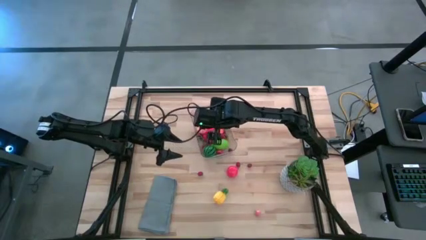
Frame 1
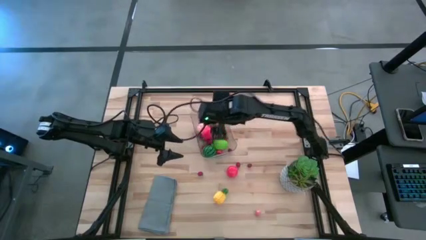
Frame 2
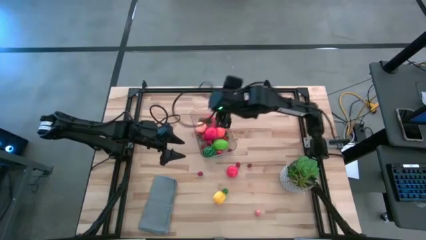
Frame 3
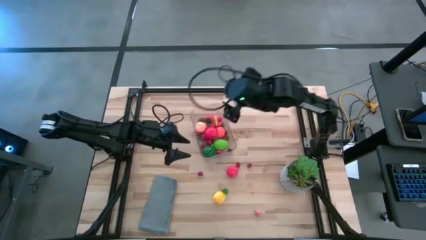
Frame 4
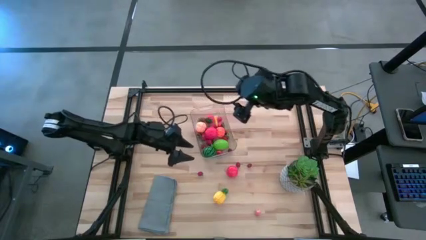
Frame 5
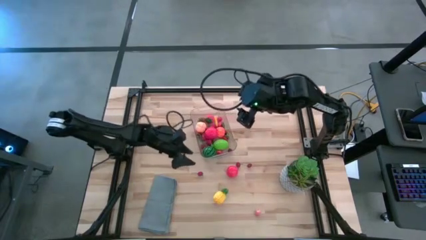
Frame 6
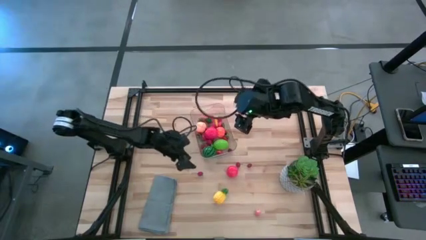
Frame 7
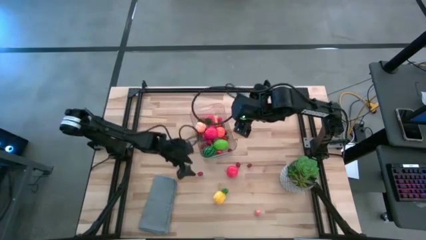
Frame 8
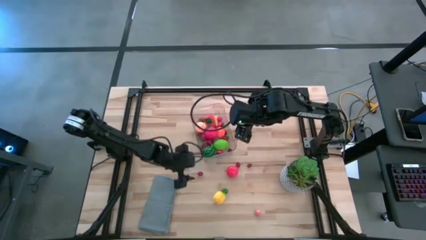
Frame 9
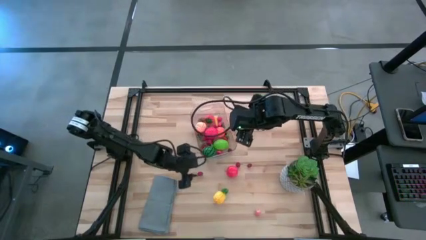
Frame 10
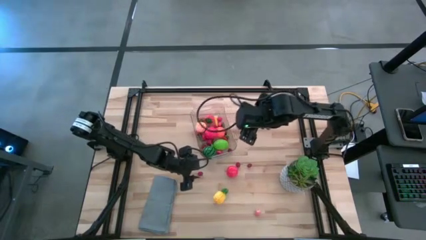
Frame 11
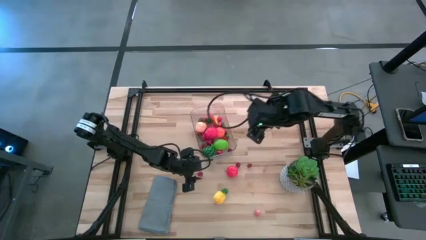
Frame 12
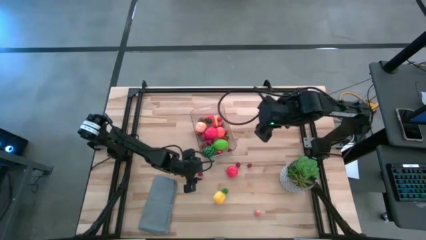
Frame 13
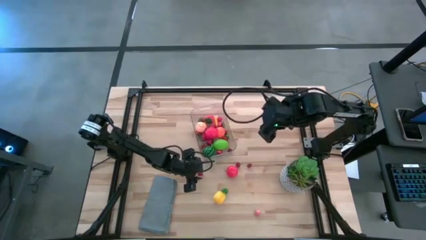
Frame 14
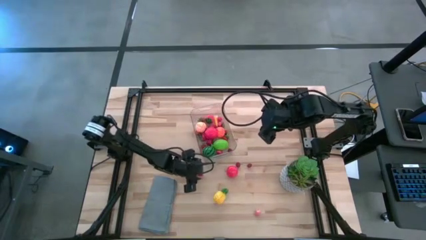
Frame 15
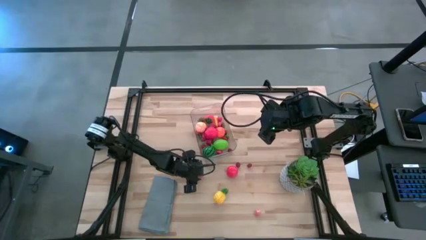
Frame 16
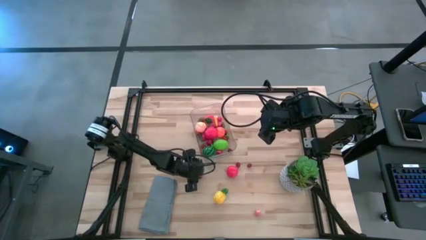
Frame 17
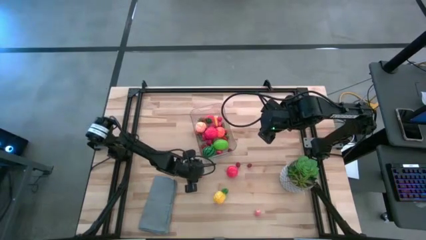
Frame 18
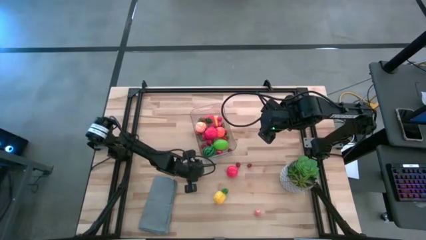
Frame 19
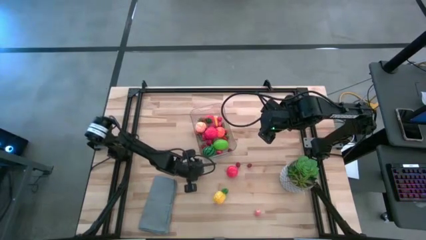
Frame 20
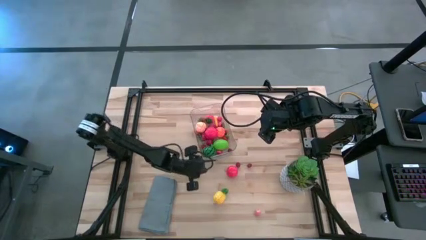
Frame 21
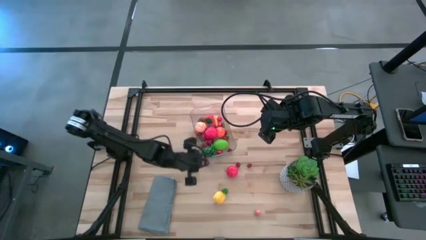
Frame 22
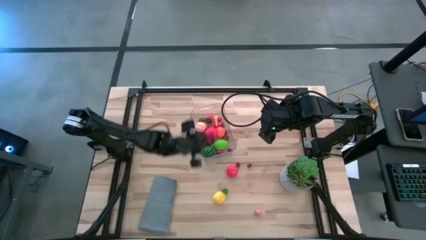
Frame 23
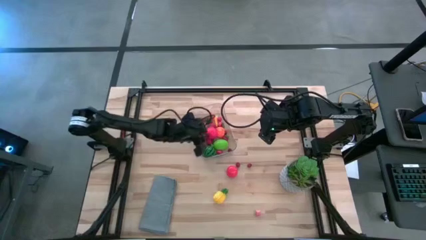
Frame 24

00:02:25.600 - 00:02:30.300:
Task: Pick and placing Produce into tupperware
Put the red cherry into the transparent container

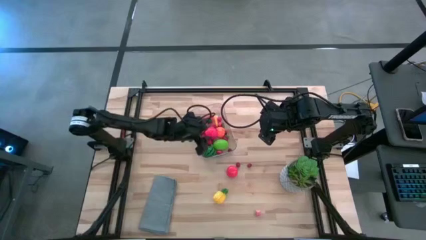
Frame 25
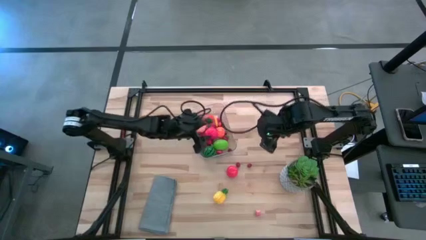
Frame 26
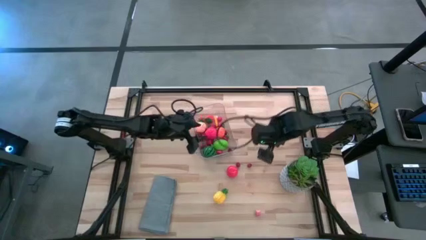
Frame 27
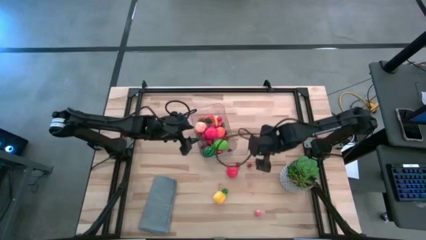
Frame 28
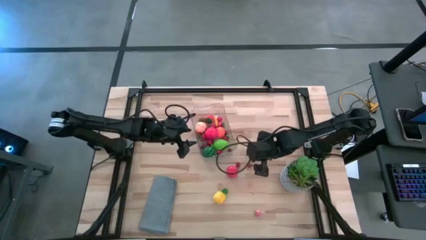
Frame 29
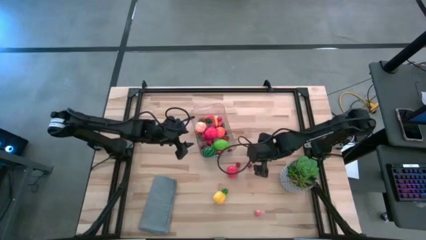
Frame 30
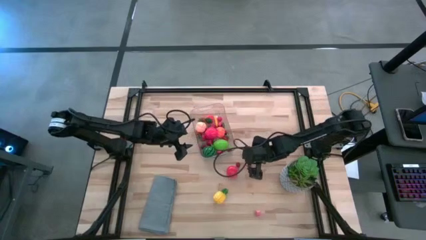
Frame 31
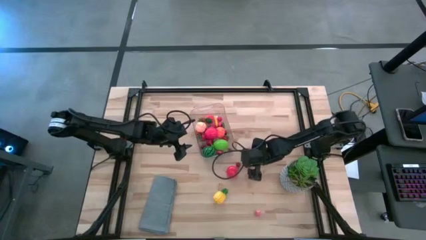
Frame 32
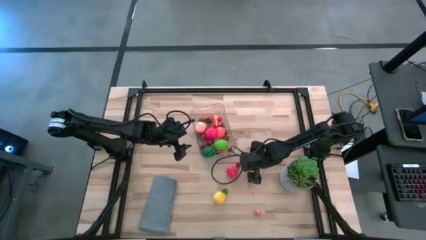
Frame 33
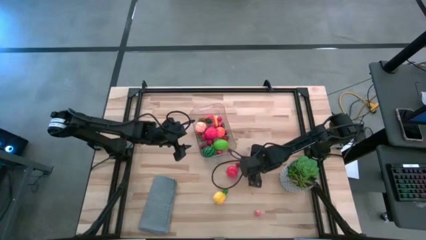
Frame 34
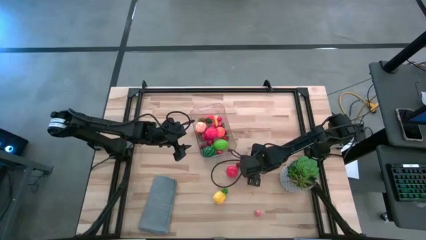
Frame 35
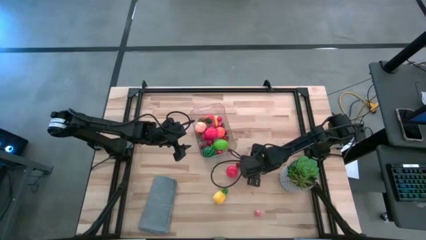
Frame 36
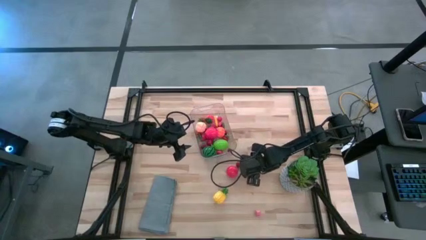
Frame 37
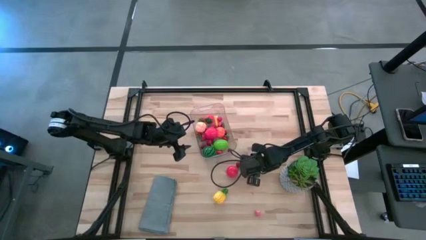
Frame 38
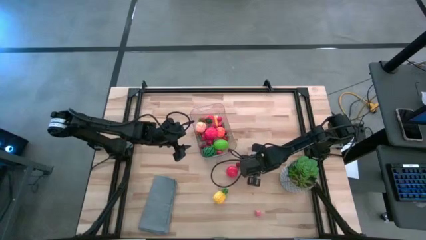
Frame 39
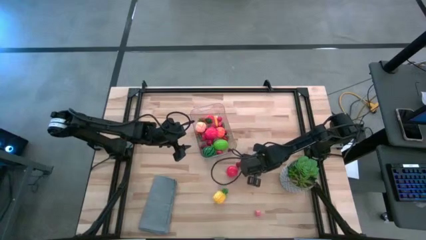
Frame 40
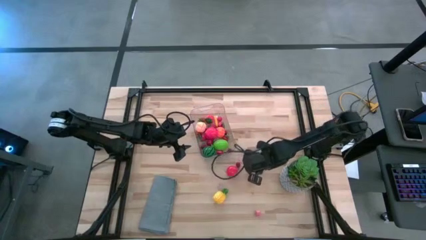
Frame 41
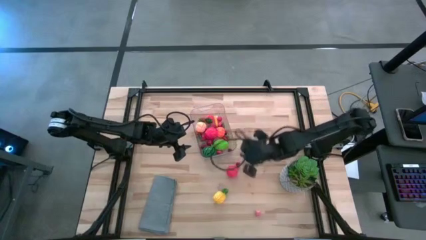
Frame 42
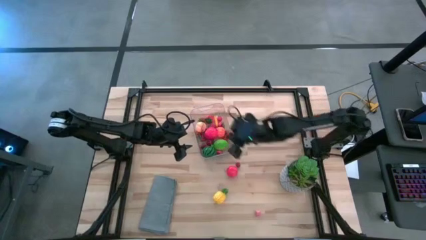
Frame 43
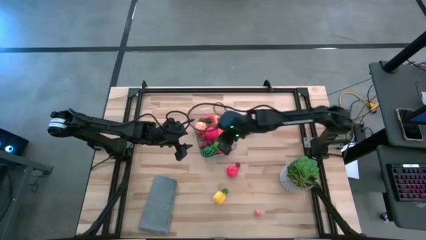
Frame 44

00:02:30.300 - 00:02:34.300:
Put the red cherry into the transparent container

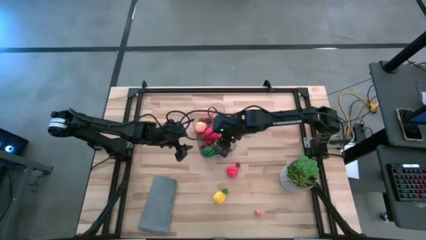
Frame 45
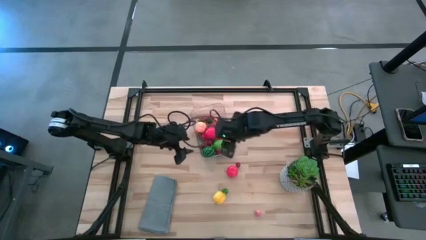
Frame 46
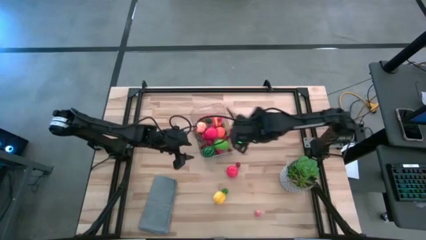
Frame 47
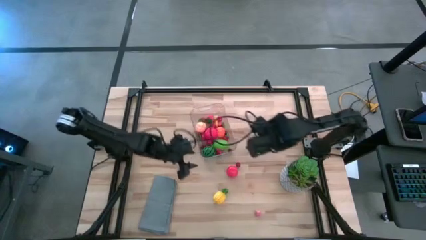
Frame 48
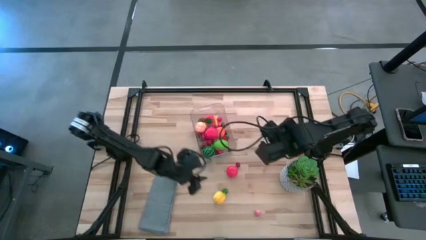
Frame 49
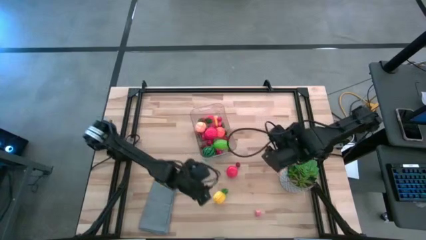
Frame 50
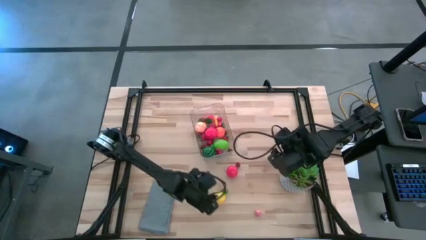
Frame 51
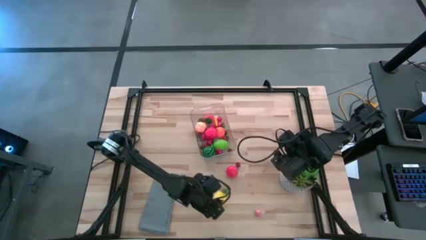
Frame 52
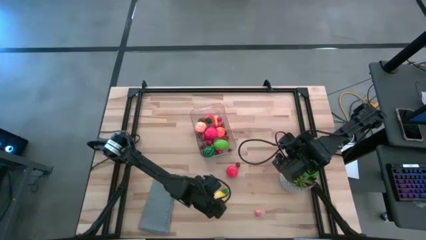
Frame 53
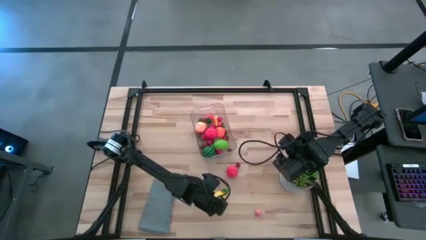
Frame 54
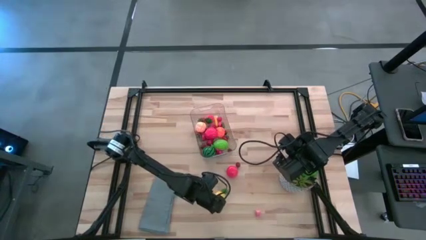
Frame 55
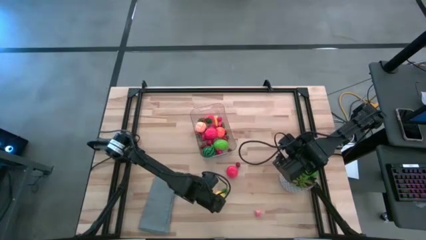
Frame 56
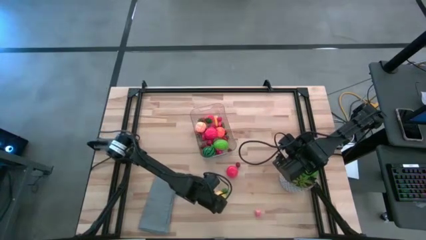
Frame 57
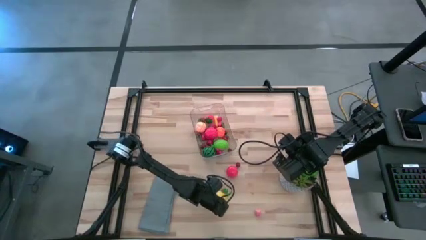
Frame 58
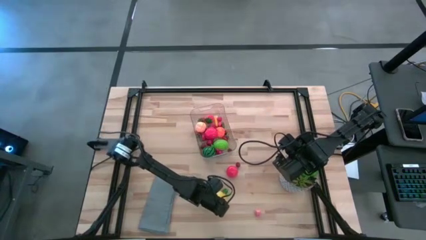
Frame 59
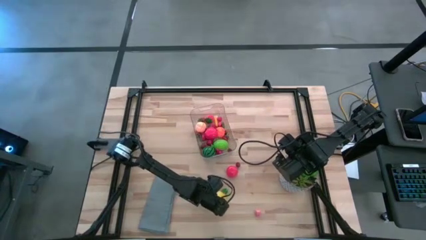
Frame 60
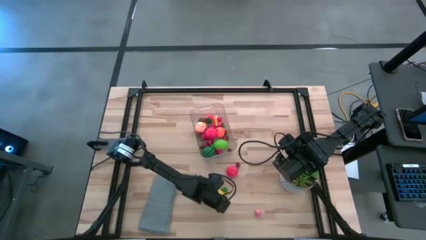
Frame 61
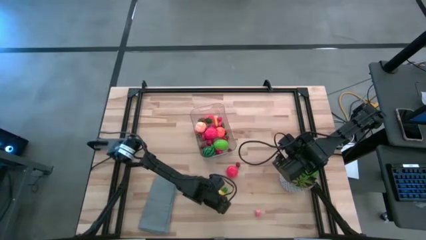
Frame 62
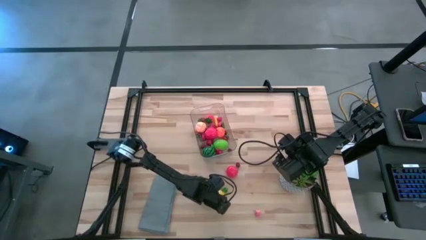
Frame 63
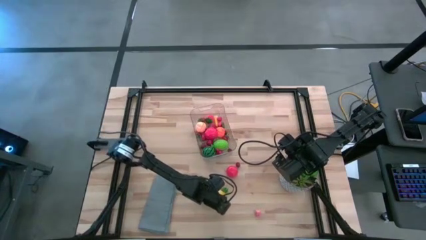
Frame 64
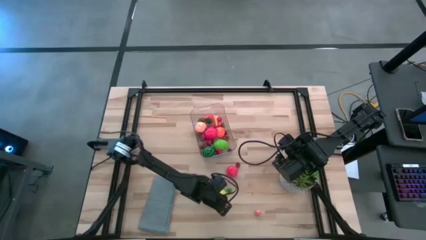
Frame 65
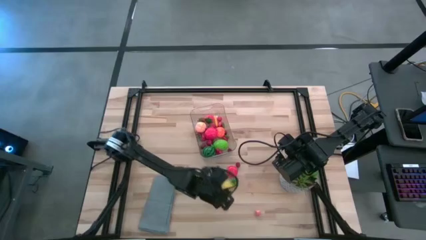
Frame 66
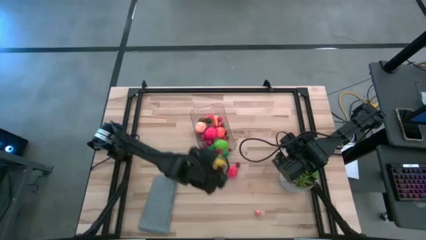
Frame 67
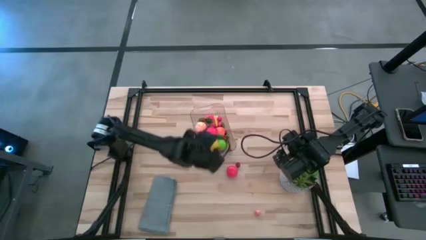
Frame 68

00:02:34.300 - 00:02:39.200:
Put the yellow pineapple into the transparent container

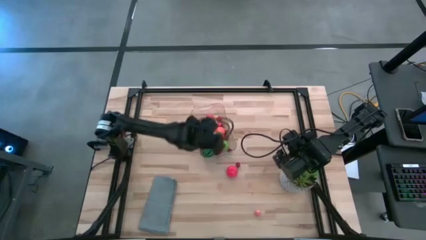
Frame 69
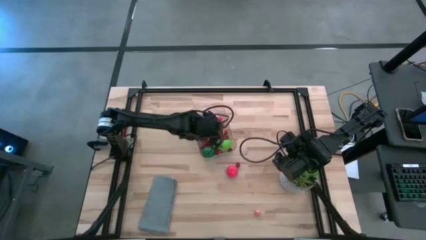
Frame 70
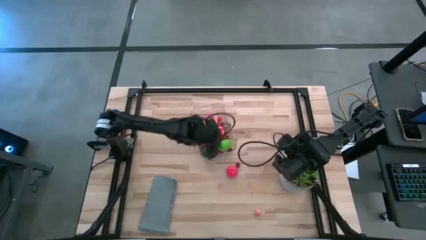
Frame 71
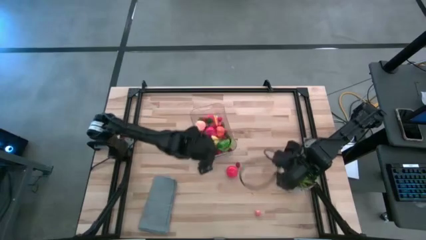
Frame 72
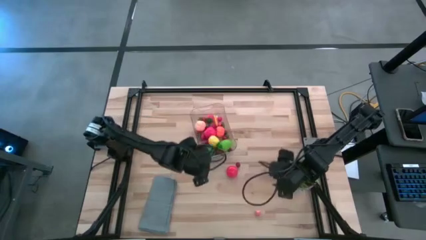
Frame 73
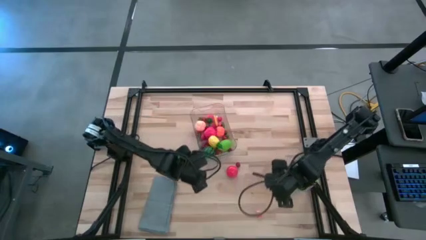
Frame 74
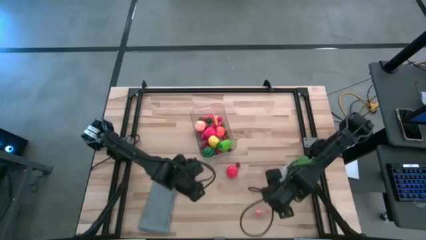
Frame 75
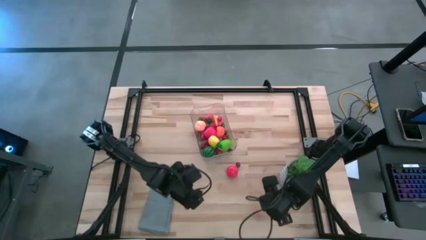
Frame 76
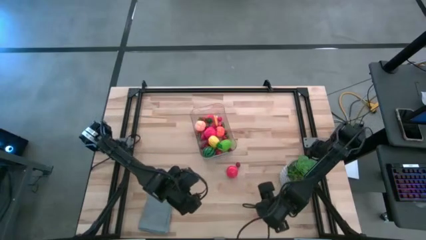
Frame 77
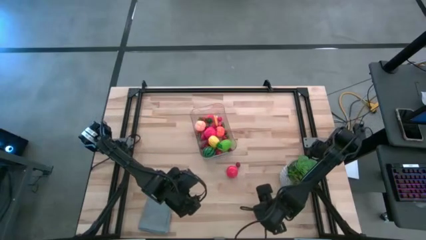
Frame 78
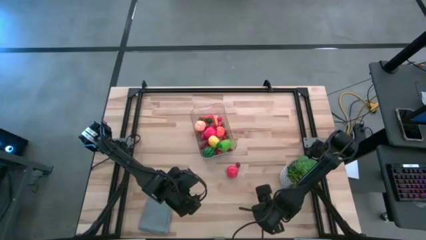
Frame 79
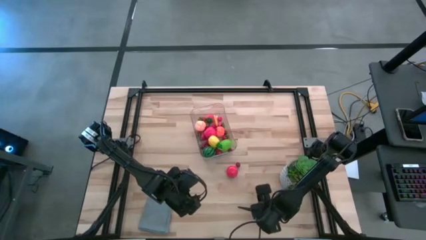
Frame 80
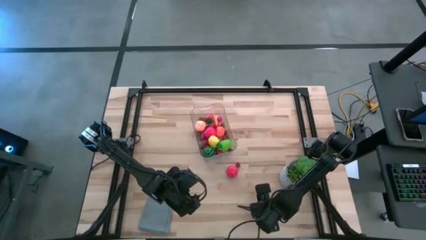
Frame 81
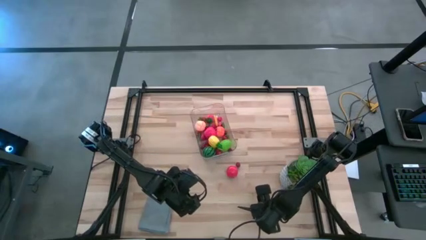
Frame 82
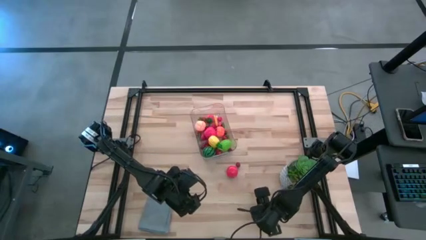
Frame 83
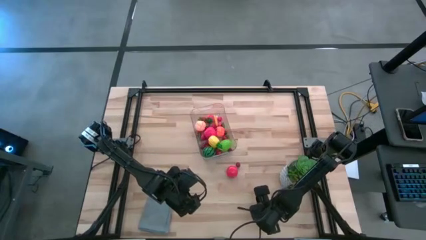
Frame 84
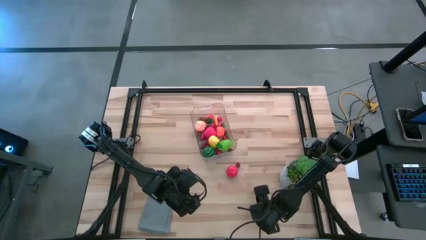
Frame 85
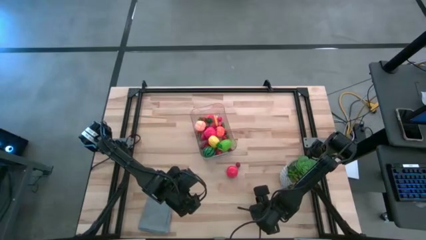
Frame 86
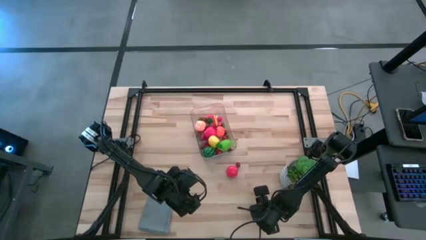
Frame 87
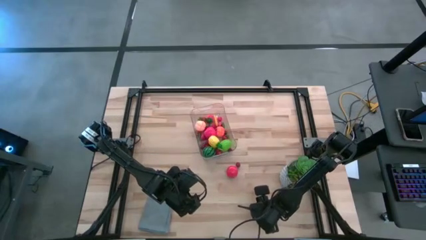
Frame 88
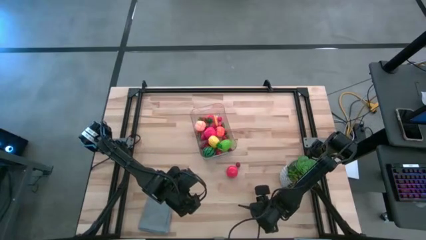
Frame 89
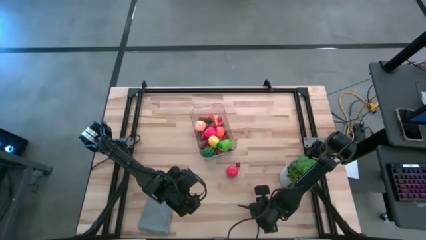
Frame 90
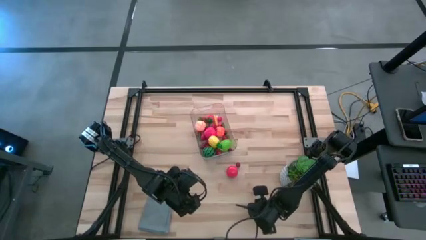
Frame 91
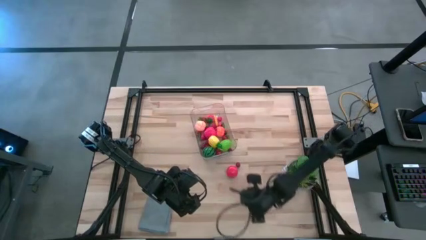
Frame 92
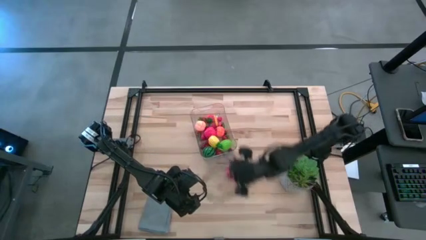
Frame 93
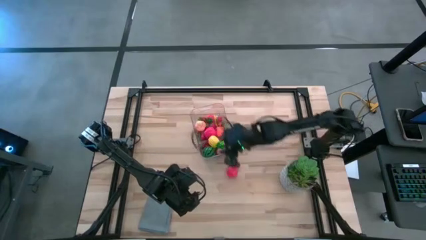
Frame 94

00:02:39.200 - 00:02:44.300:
Put the pink peach into the transparent container
